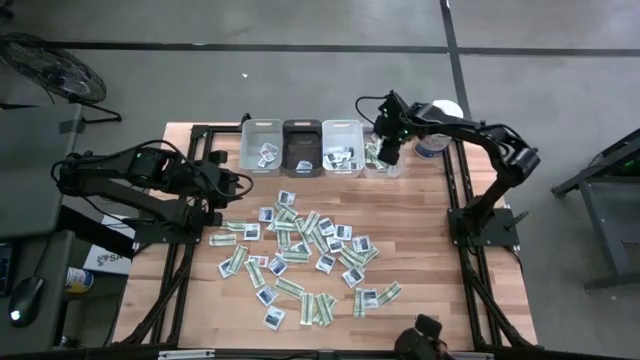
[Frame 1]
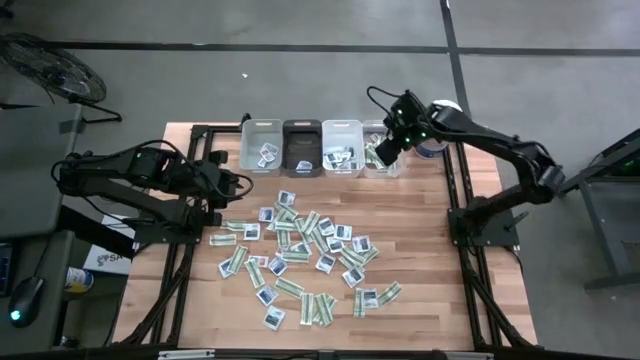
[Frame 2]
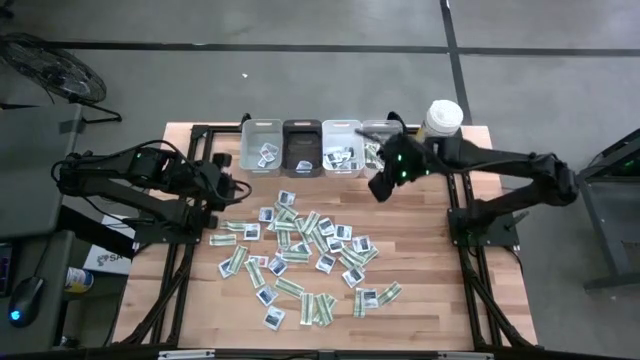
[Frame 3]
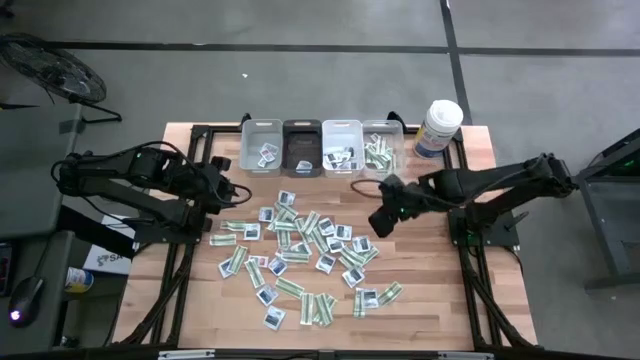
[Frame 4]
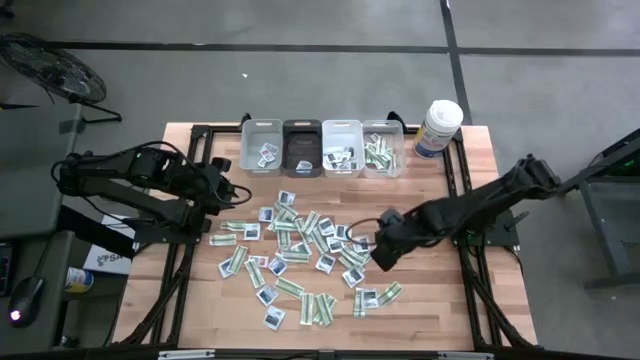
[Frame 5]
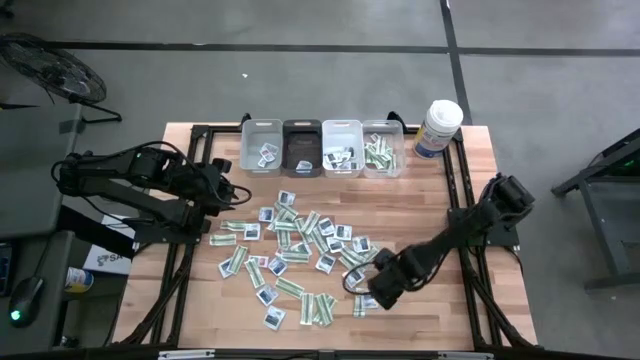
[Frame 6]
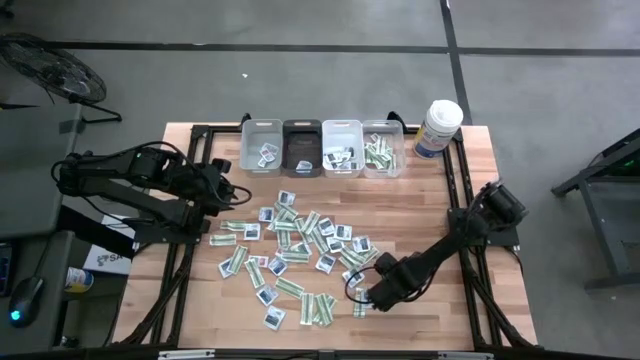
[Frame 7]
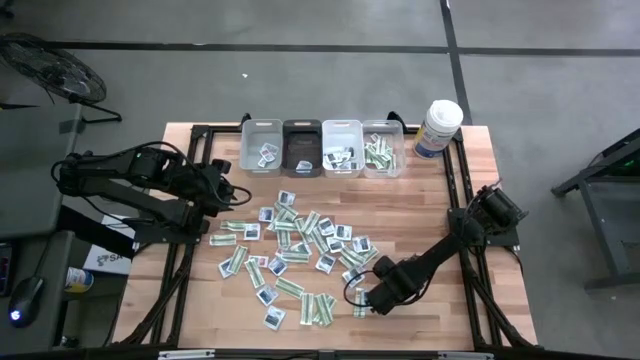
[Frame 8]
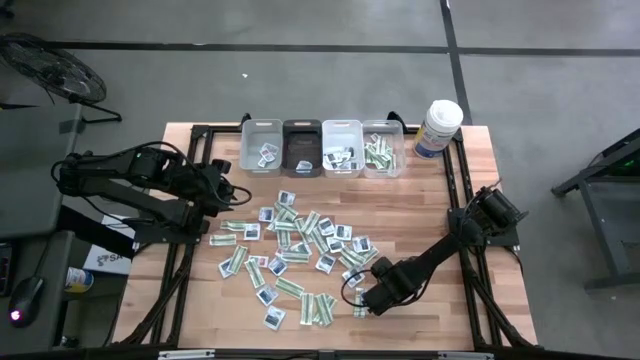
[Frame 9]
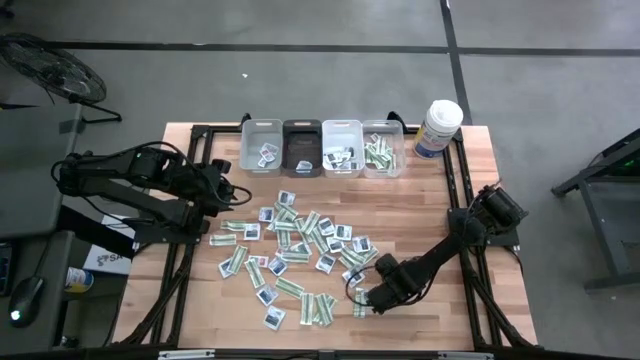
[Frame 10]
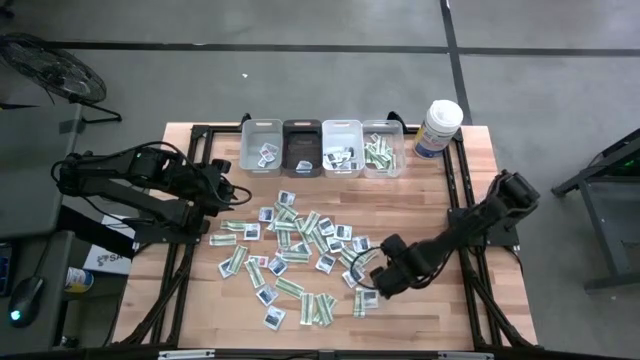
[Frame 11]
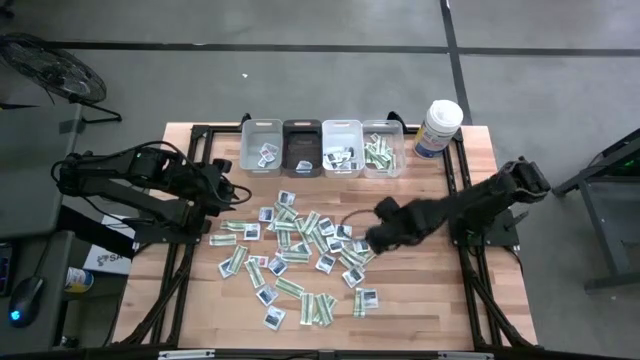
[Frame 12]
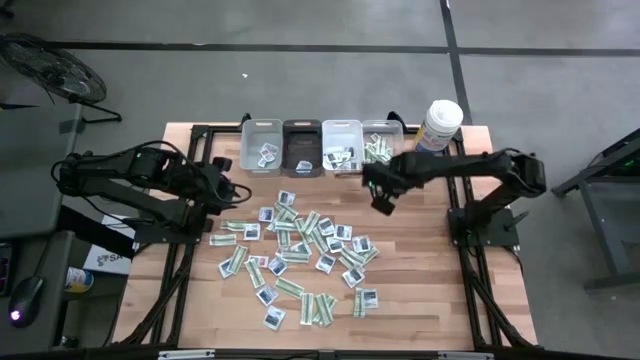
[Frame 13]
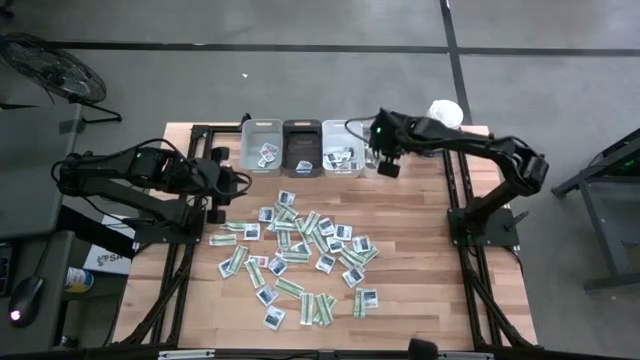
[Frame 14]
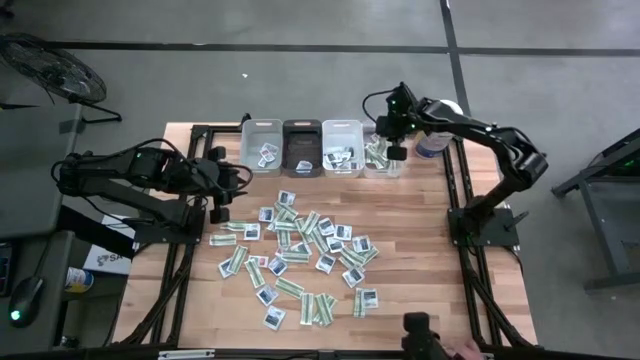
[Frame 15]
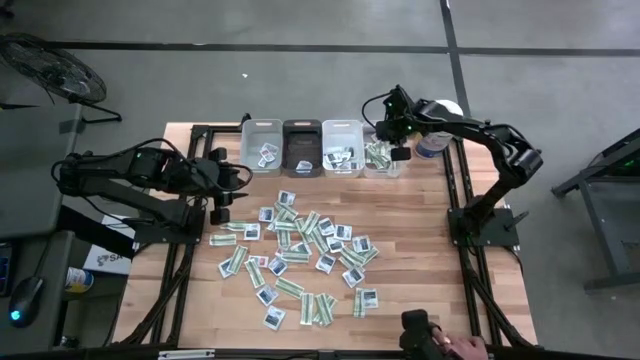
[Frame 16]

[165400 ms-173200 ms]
Task: Pick & Place First Aid Supplies
Put the green bandage into the transparent bin

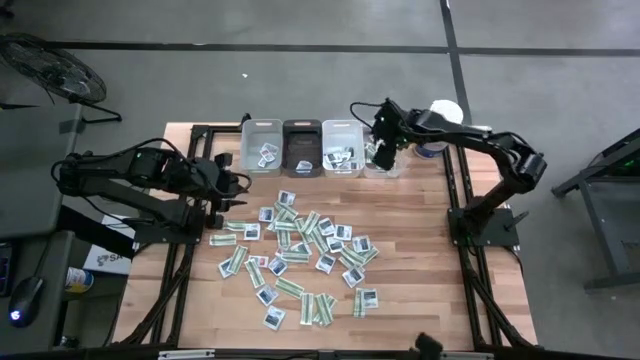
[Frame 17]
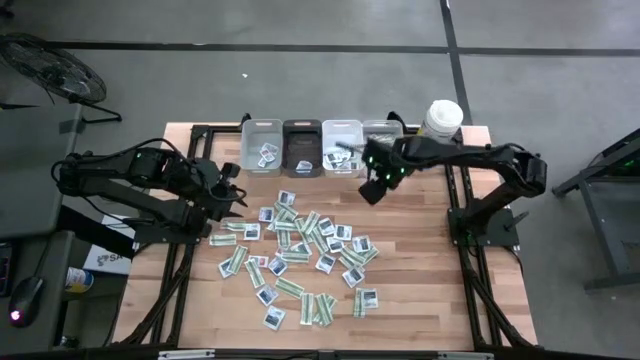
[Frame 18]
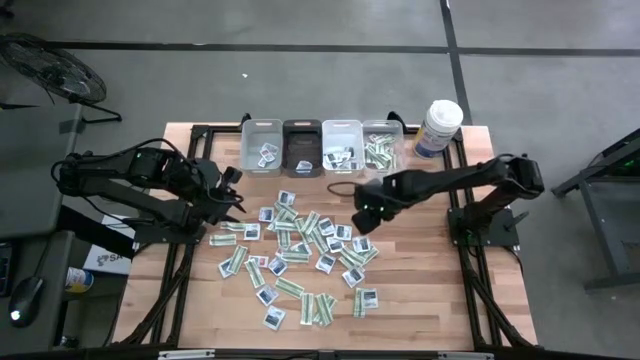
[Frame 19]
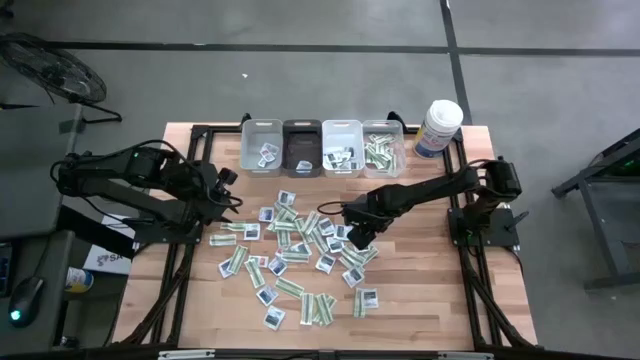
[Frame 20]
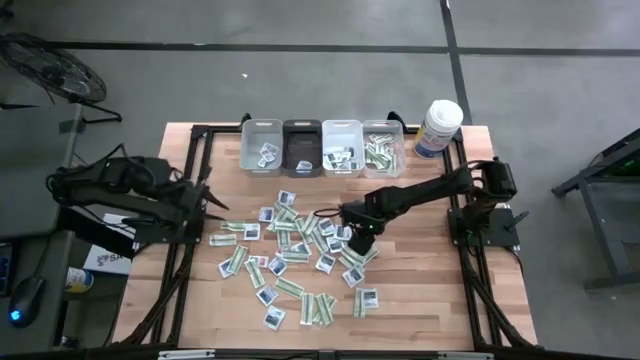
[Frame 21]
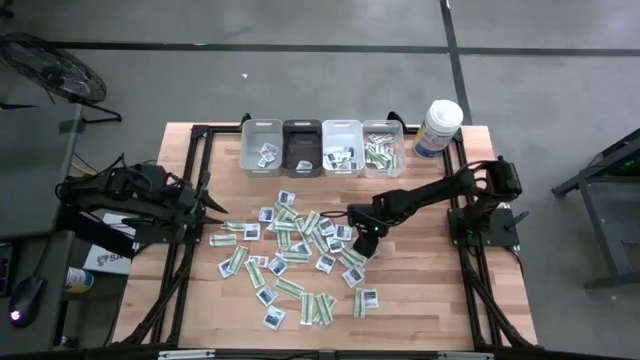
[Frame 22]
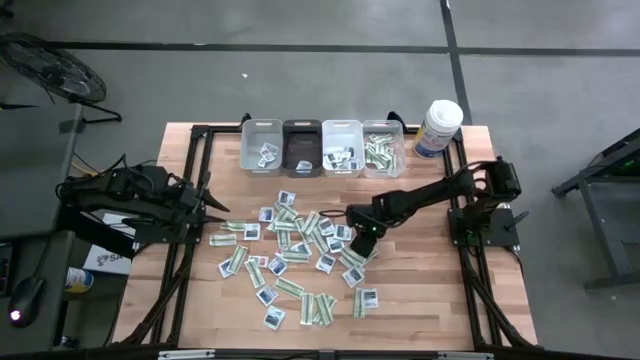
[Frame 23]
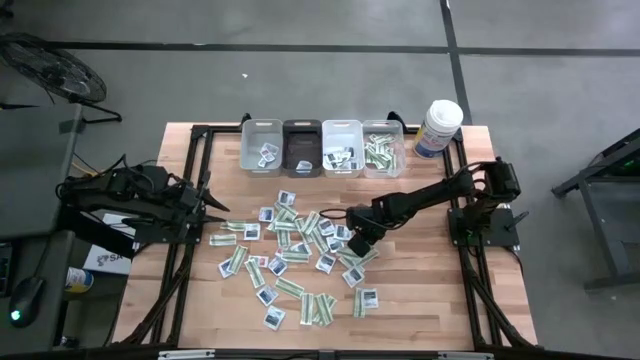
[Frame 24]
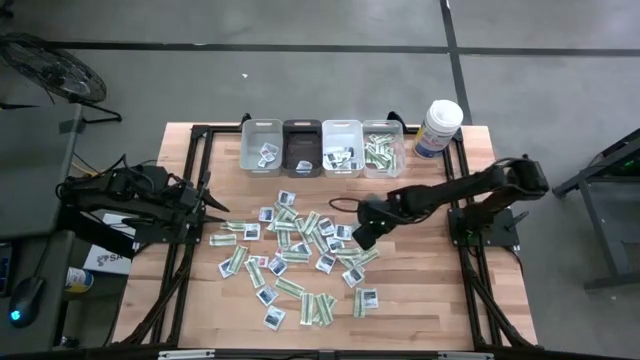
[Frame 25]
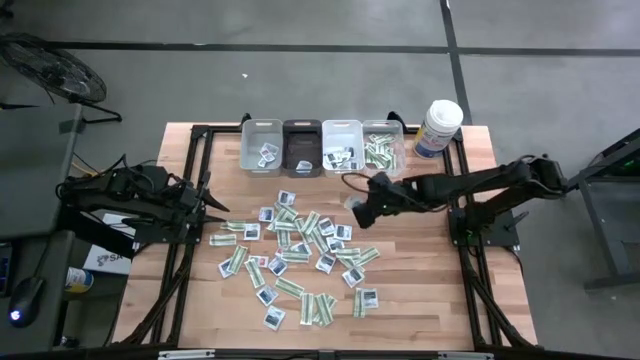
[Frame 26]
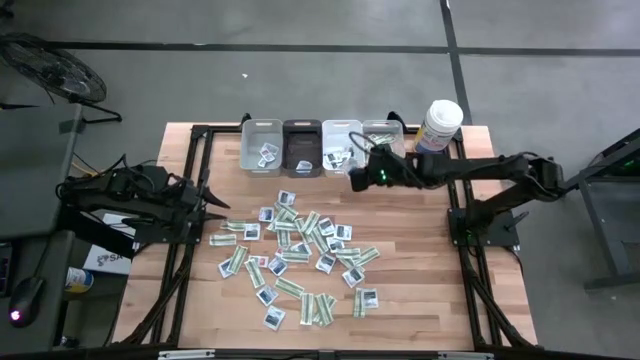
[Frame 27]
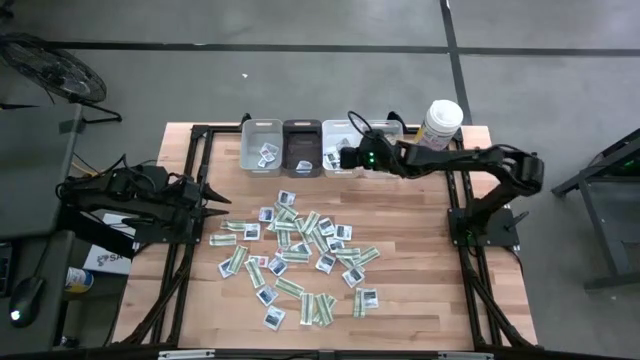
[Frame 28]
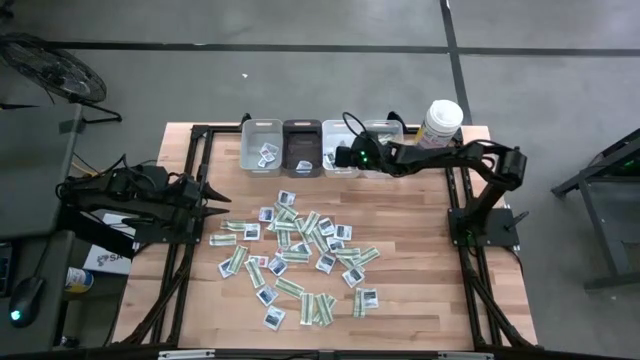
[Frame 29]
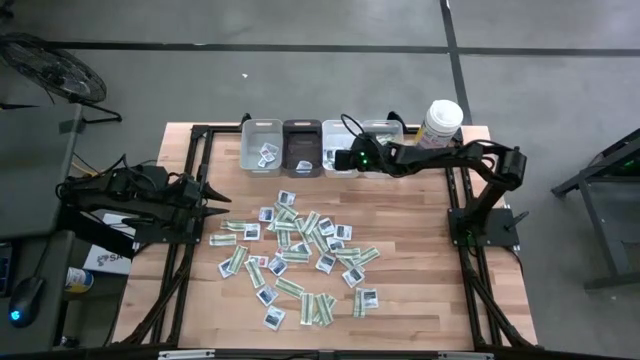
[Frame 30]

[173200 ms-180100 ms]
Put the black towelette pack into the white bin

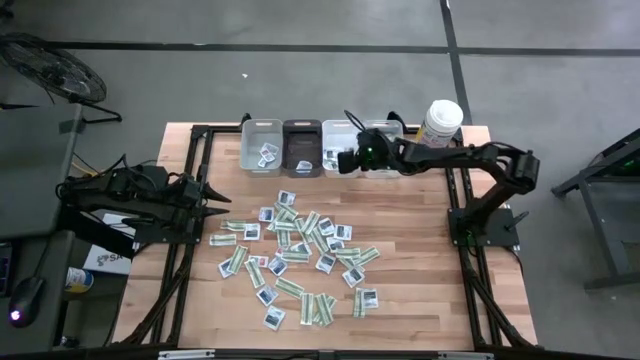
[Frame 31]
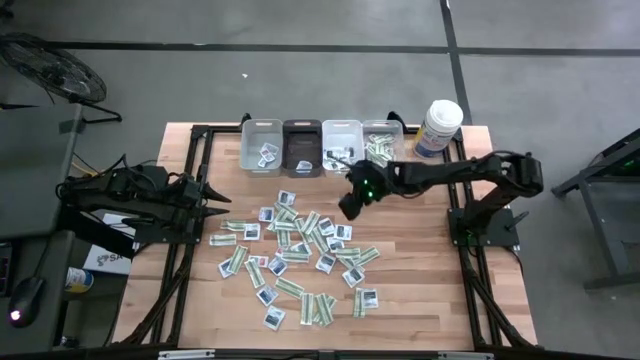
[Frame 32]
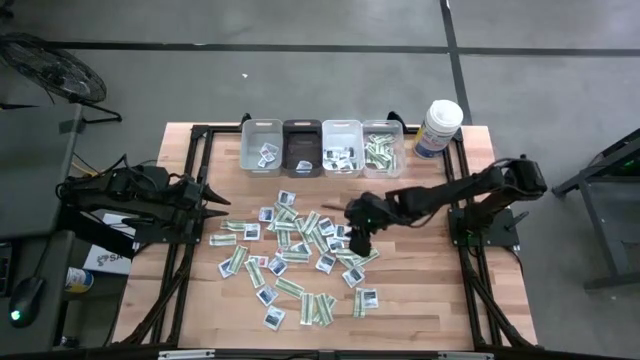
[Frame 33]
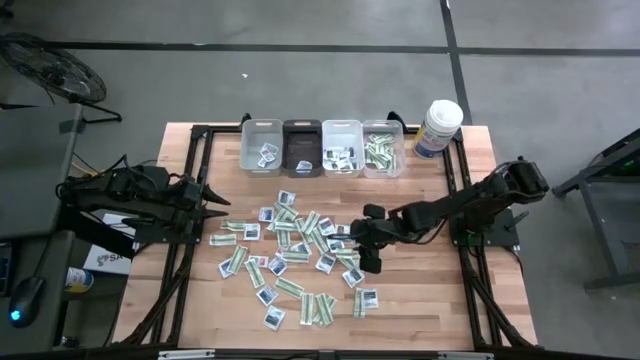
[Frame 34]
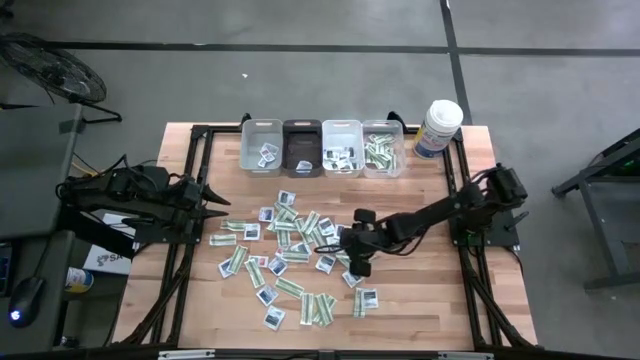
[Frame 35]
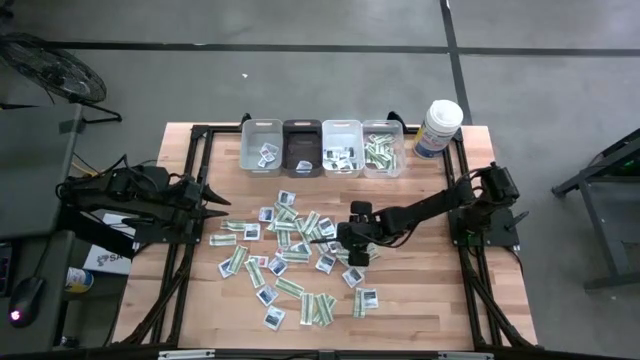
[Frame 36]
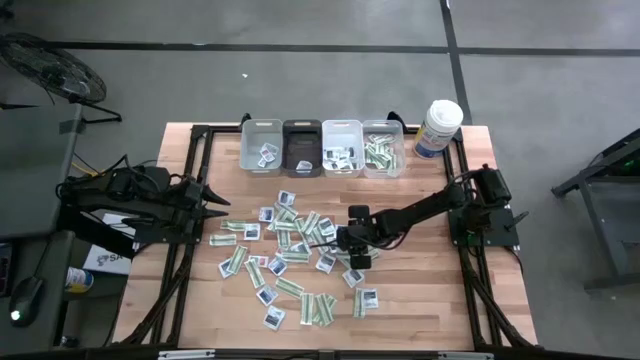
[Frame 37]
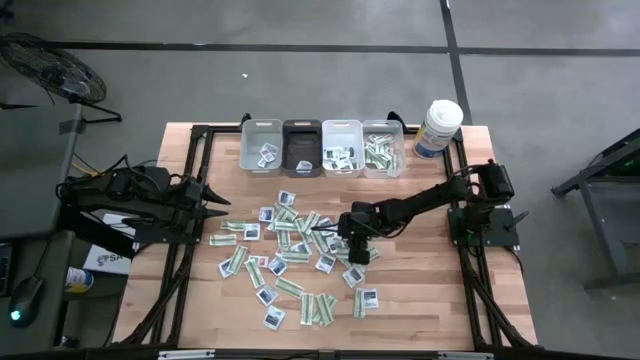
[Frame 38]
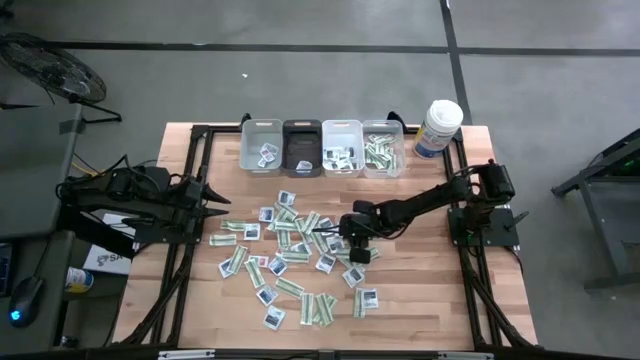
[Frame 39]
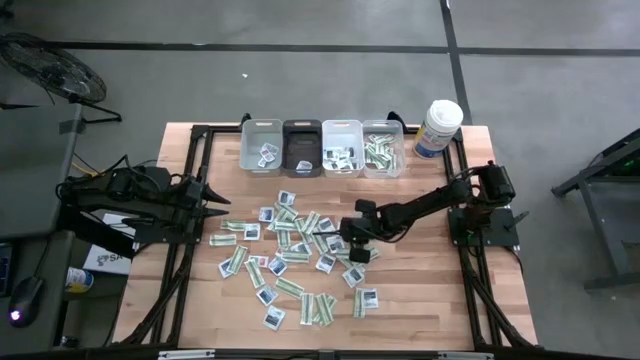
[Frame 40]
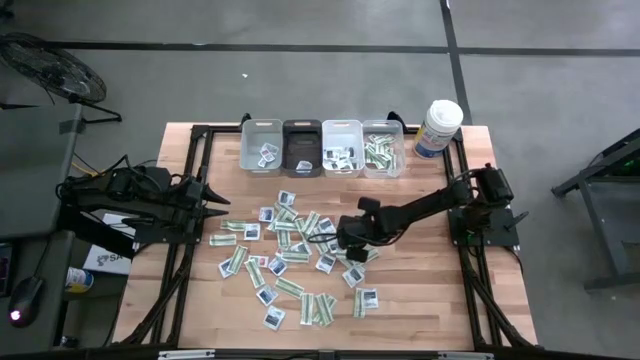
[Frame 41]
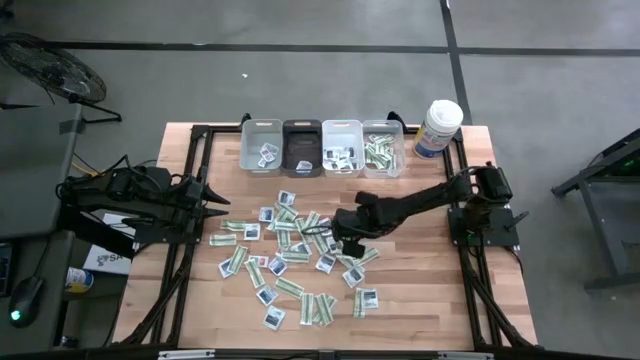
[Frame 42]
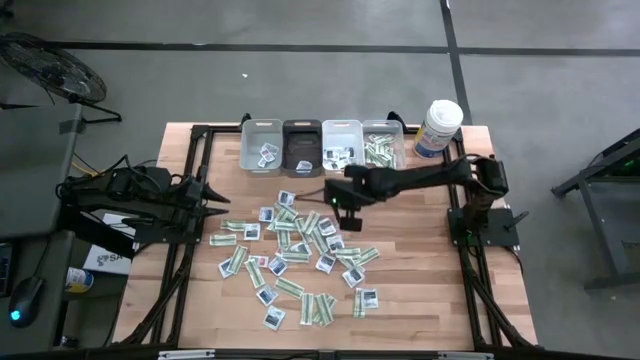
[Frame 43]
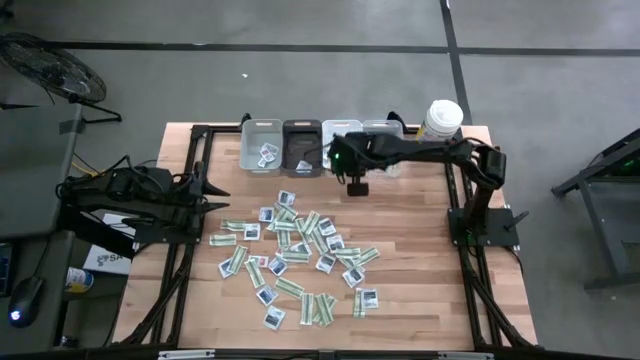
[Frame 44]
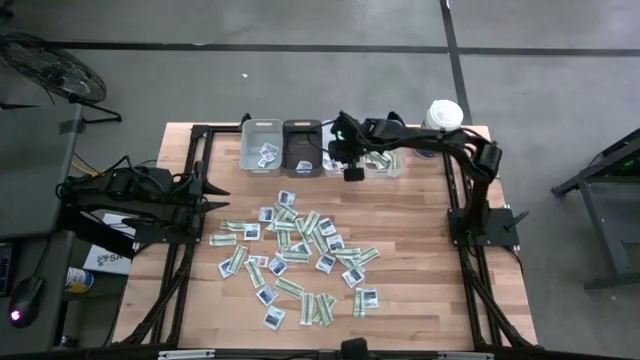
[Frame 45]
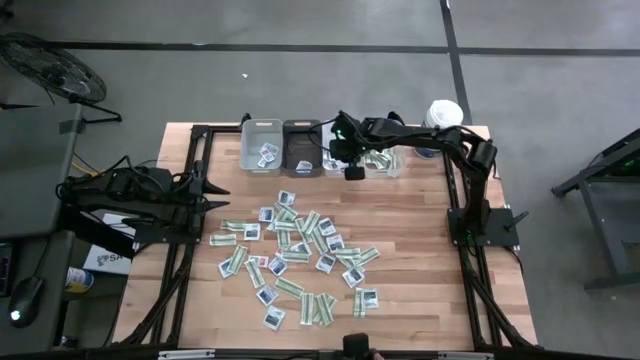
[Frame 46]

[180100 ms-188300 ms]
Put the black towelette pack into the white bin
